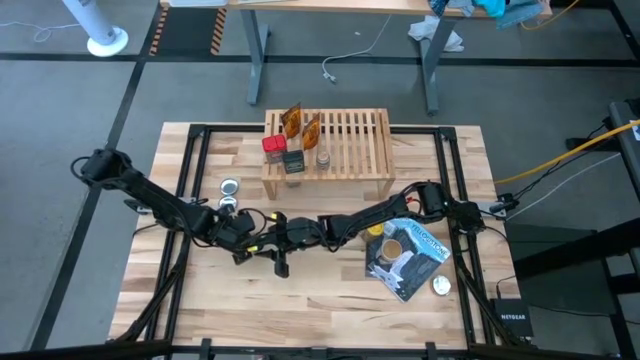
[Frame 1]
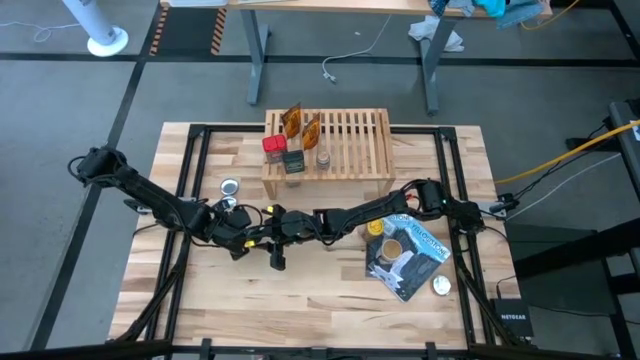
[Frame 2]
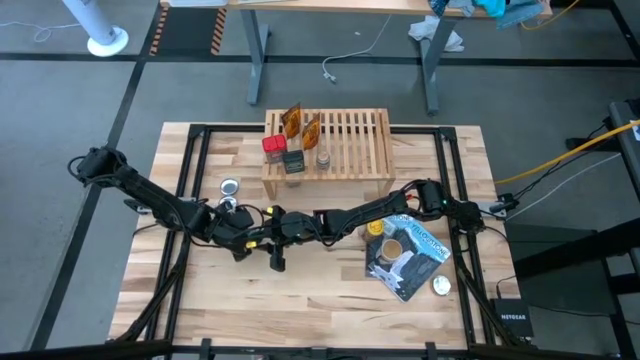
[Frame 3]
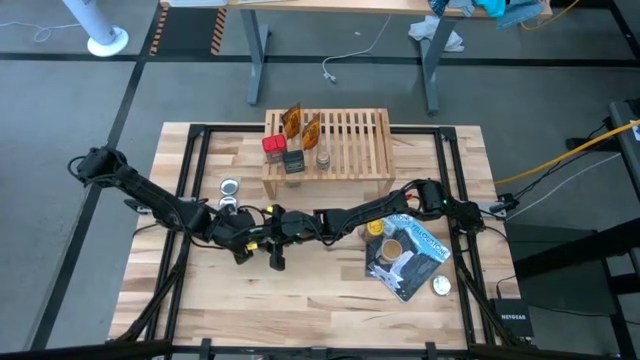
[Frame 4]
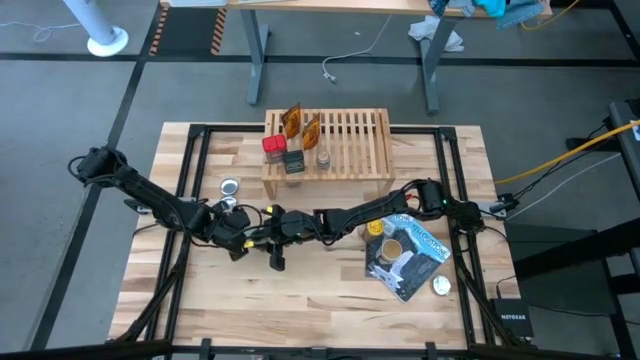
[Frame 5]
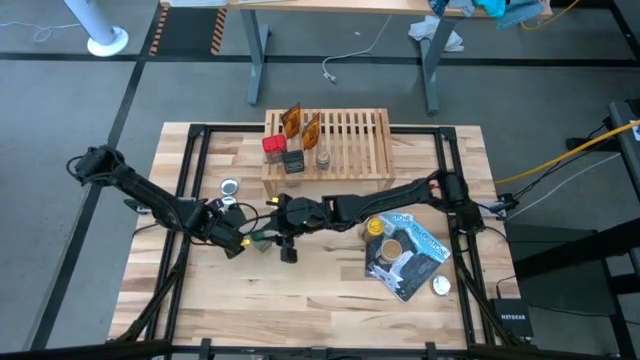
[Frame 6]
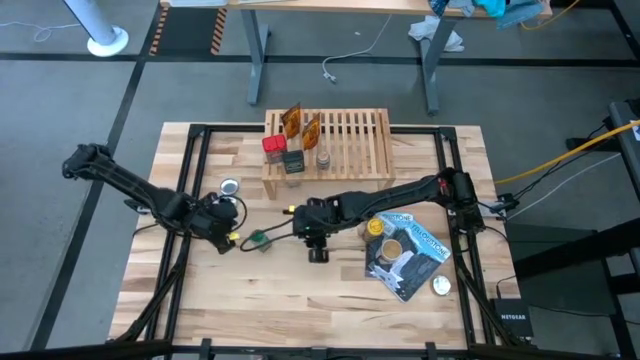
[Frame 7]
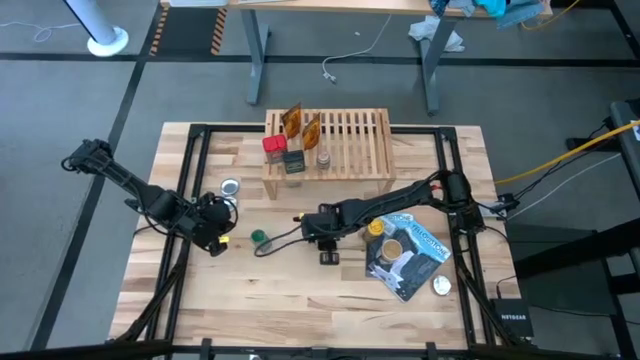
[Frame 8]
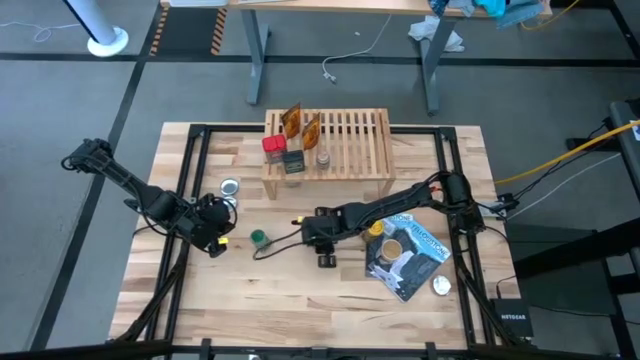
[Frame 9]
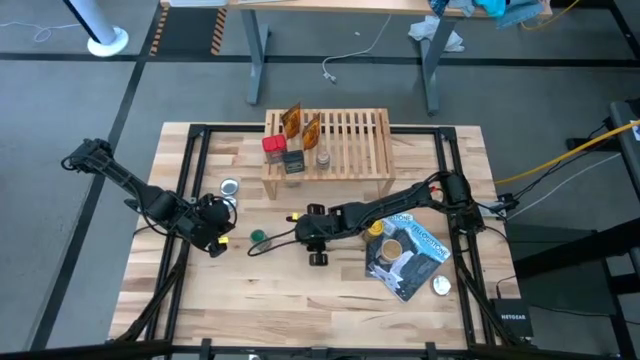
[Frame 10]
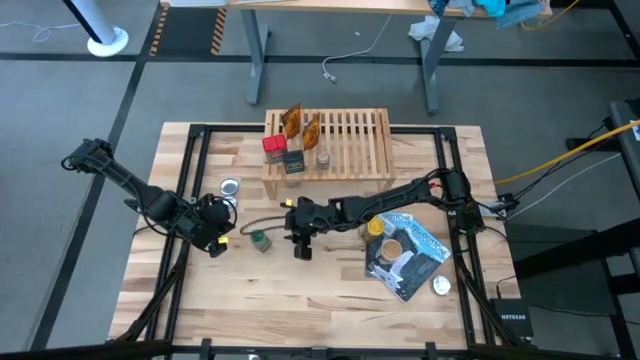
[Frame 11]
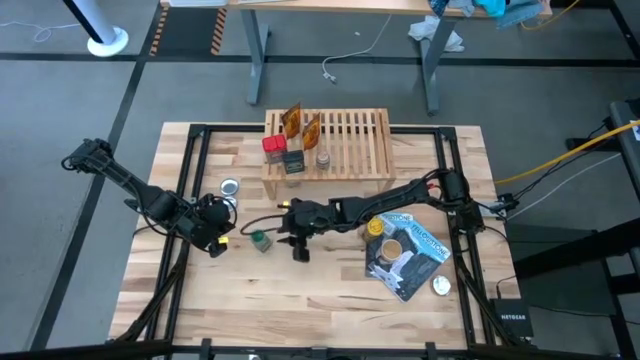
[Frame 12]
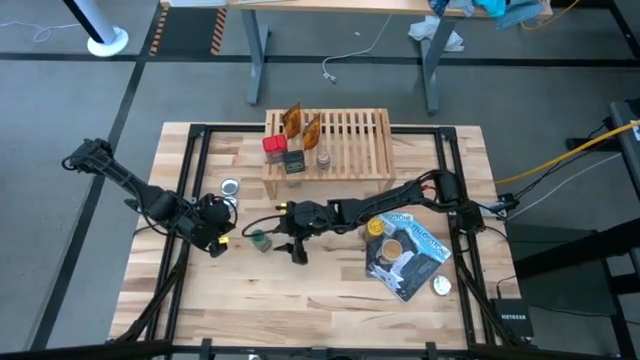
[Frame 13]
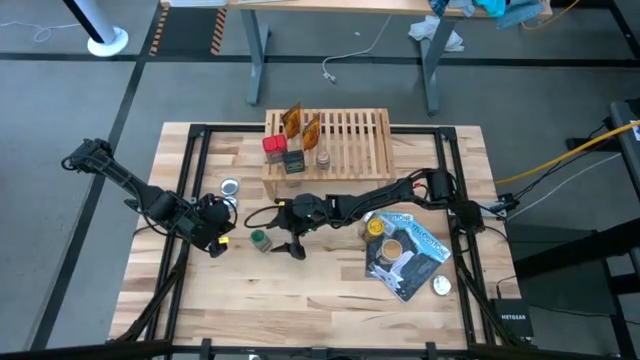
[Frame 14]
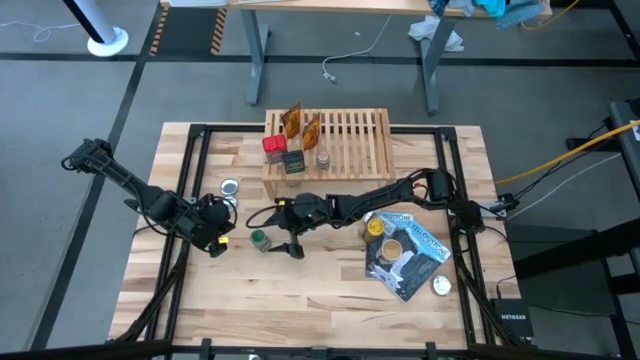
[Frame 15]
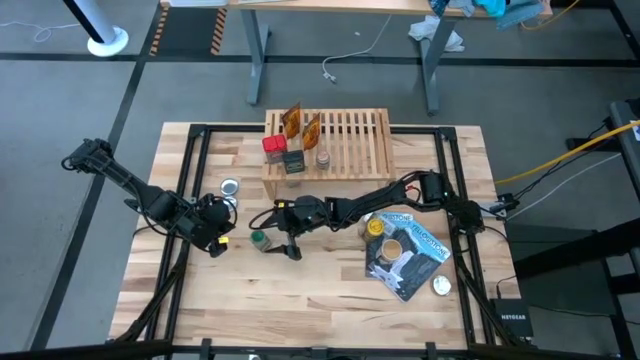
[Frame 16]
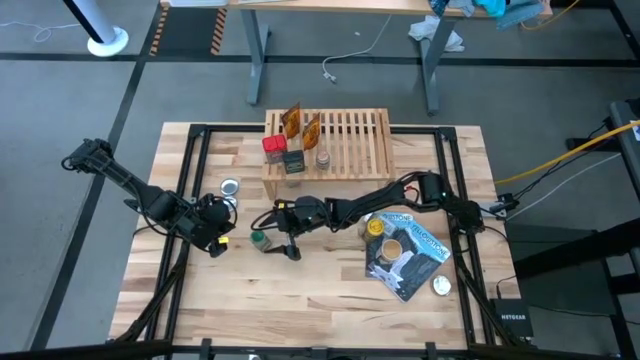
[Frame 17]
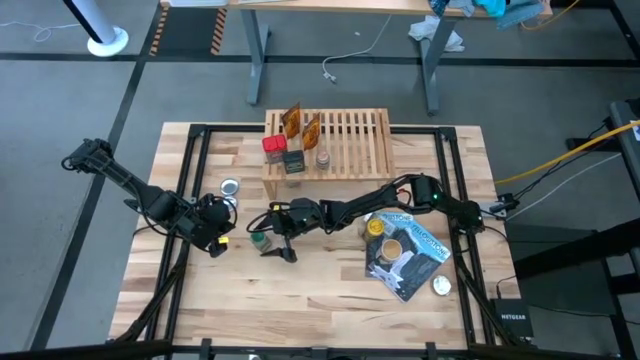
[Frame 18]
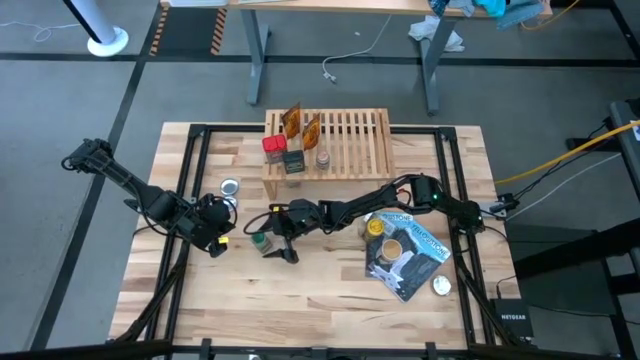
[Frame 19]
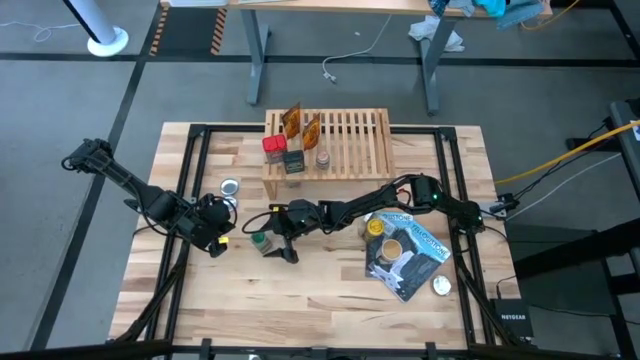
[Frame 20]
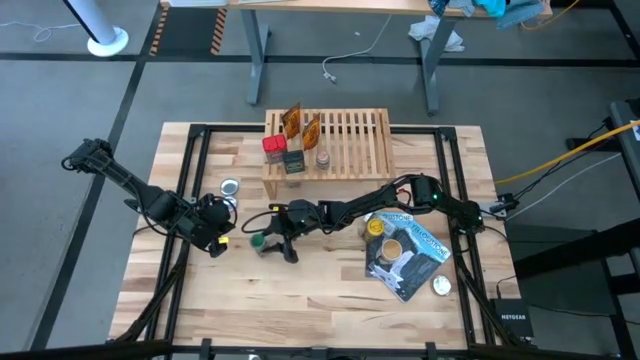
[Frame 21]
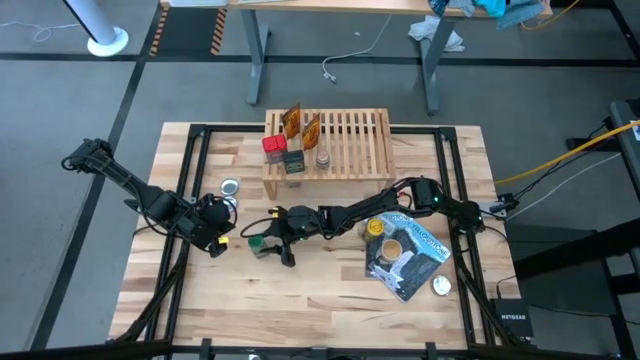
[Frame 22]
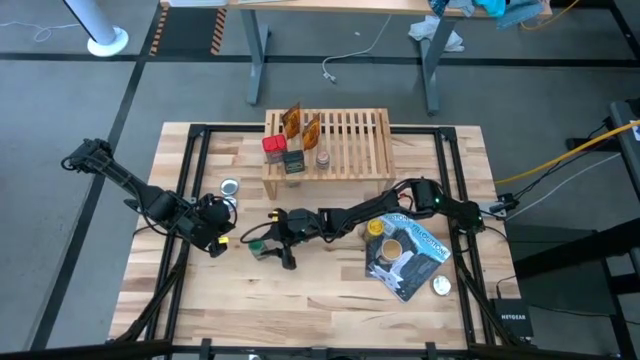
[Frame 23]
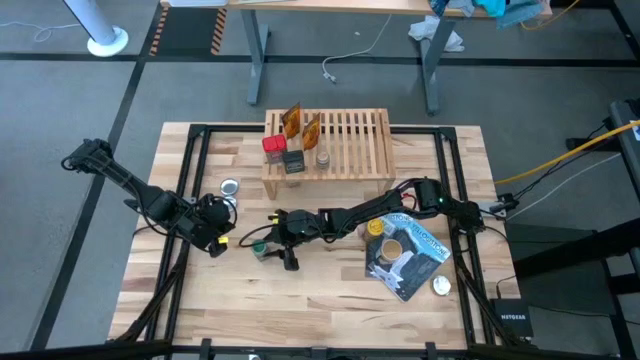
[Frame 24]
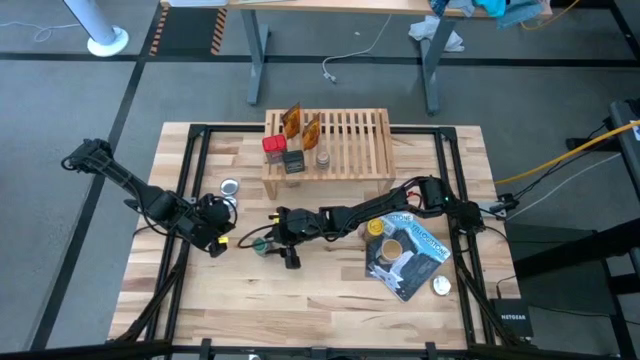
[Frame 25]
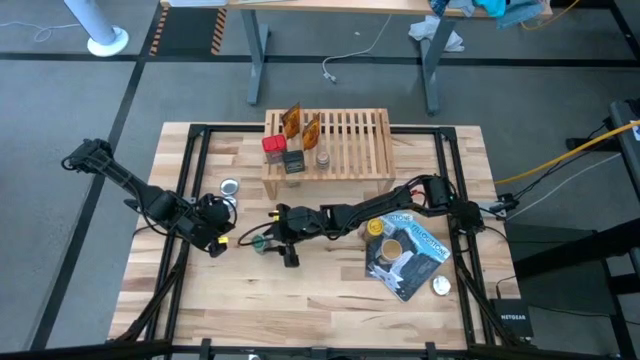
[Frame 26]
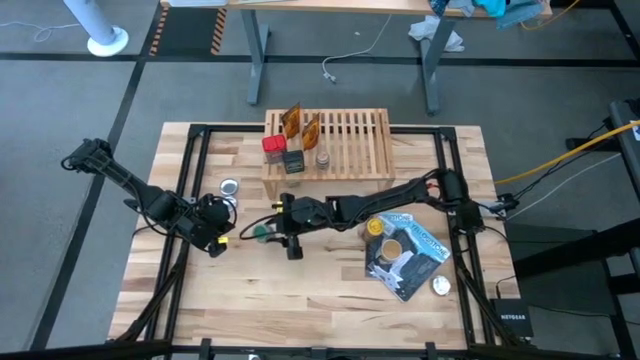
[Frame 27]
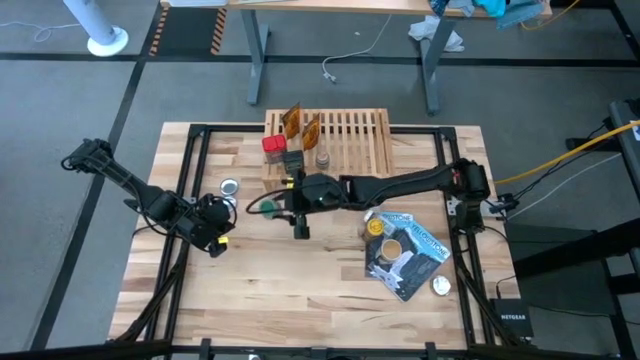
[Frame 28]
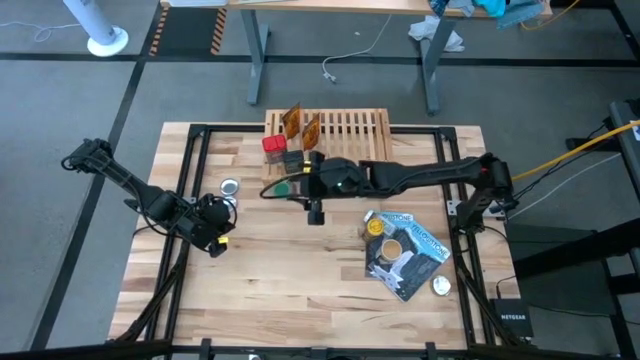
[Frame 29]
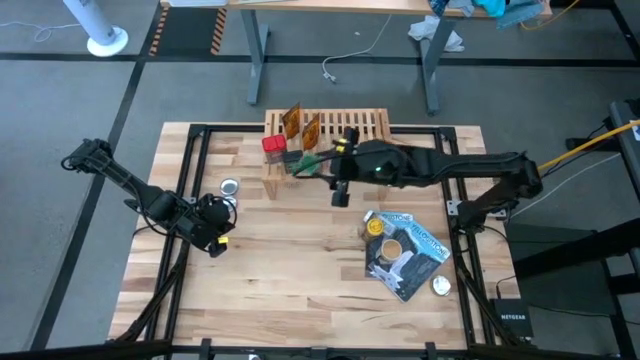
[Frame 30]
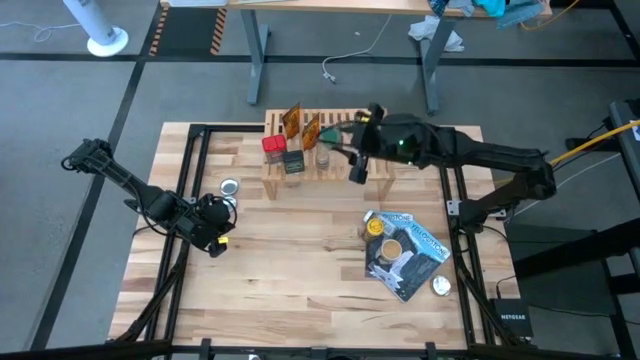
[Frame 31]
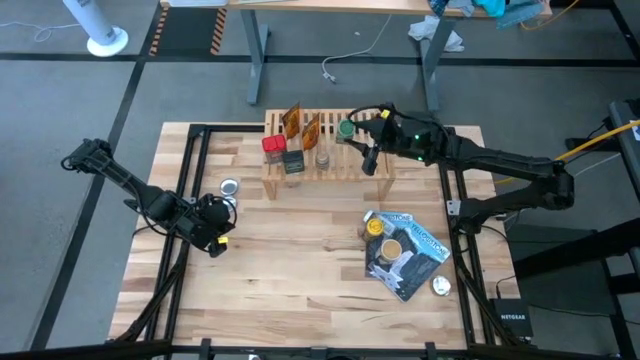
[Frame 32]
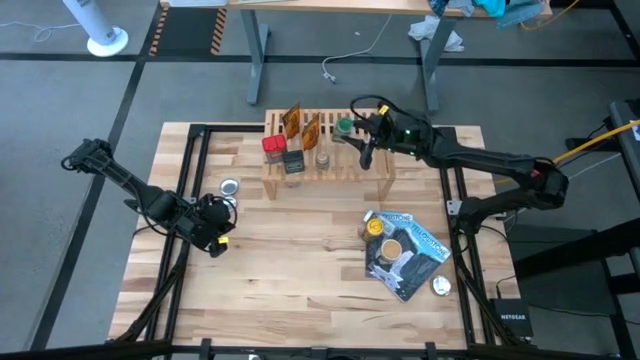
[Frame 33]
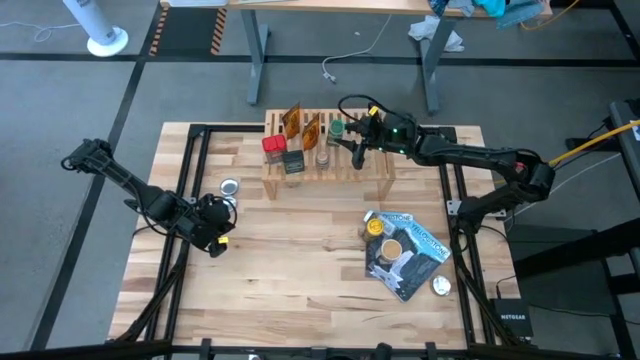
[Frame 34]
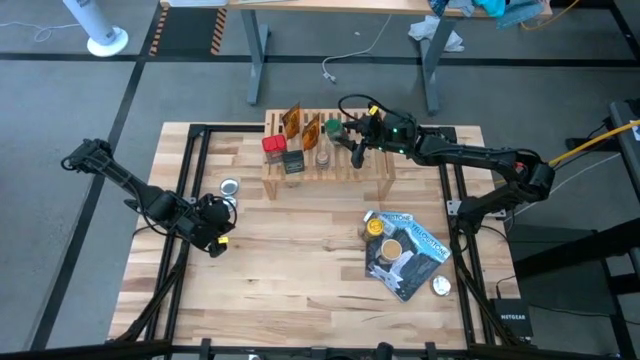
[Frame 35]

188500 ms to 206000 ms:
Task: Shelf spices
Put the green seasoning bottle on the shelf

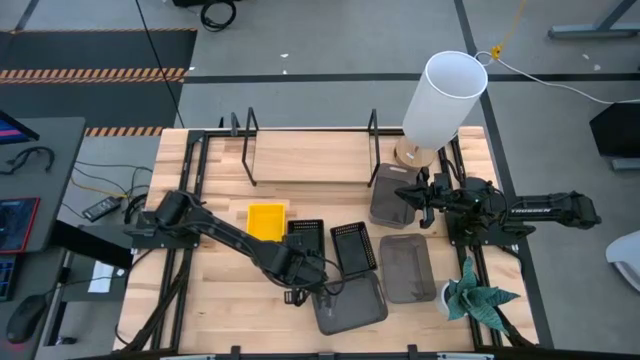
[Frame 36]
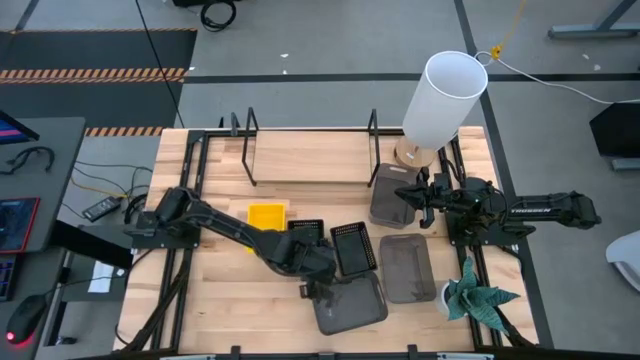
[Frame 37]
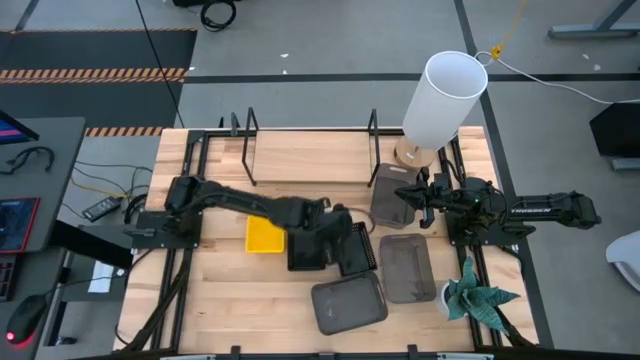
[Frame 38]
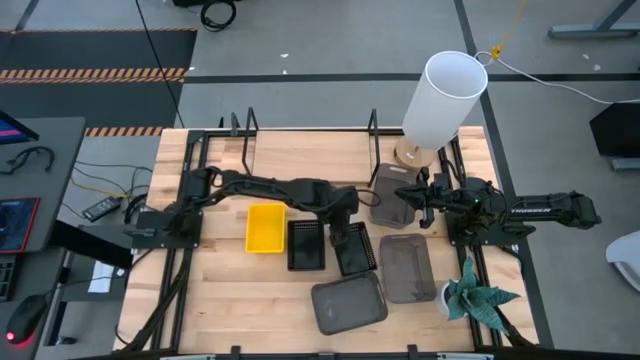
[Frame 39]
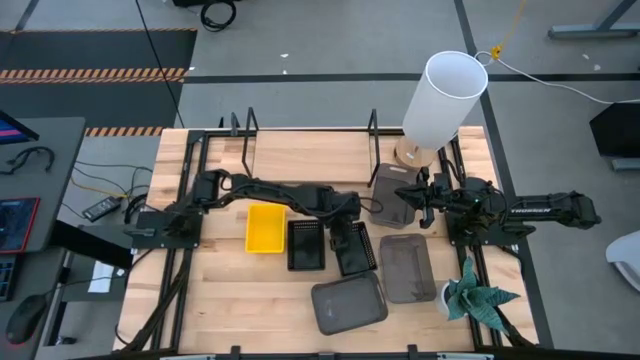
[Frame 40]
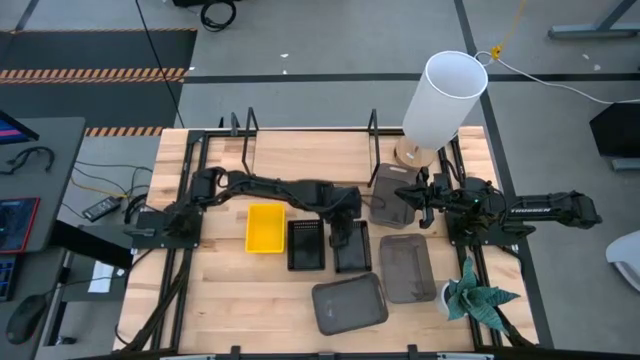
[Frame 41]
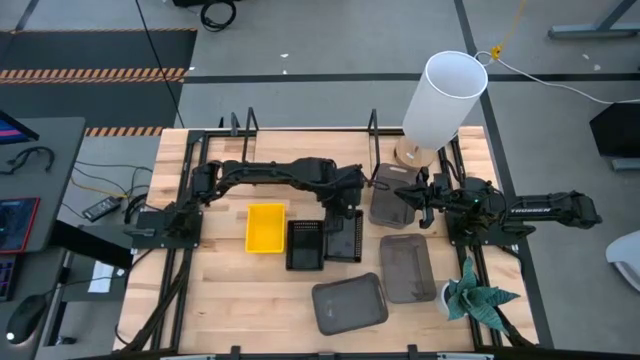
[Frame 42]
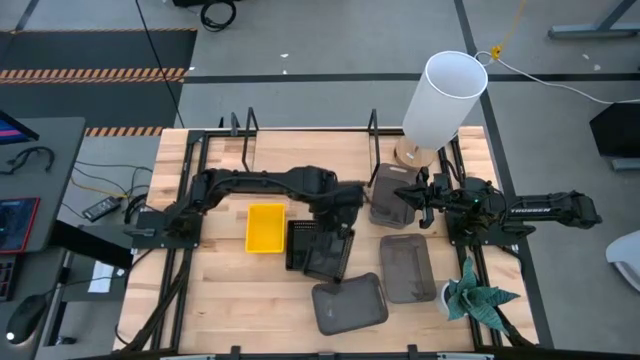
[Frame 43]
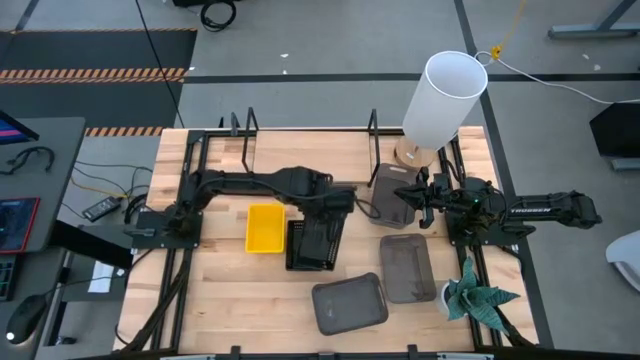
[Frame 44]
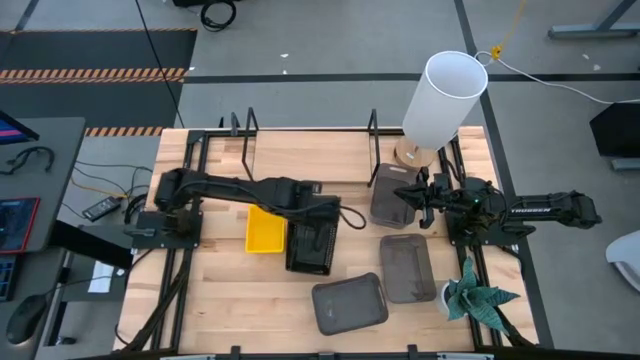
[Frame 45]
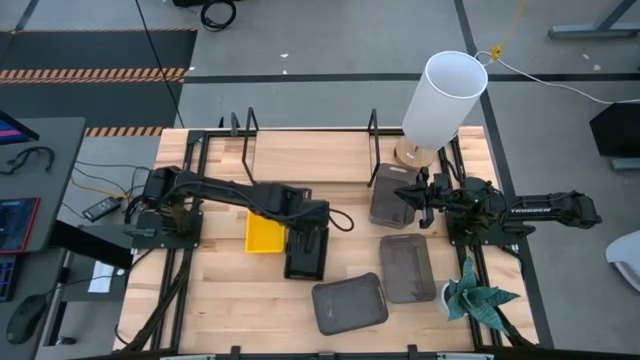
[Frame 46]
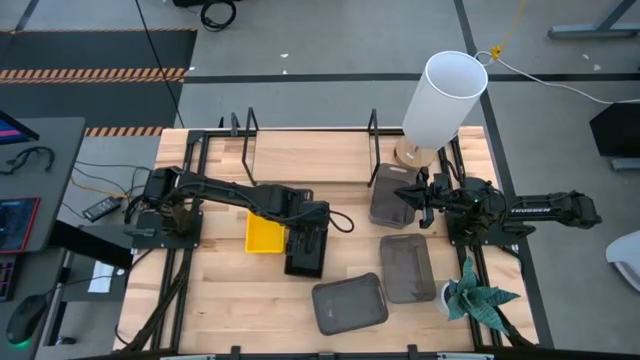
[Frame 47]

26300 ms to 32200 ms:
Task: Stack baskets on shelf by color
Stack the right black bin on top of the other black bin
